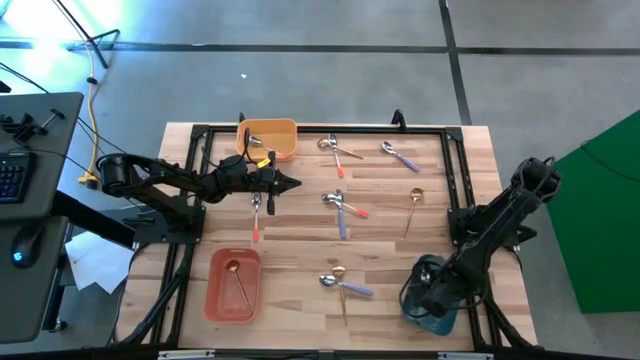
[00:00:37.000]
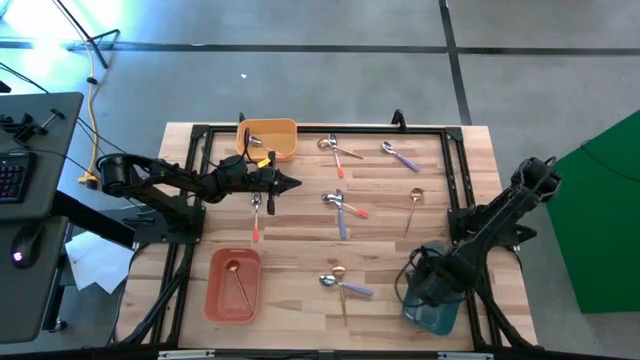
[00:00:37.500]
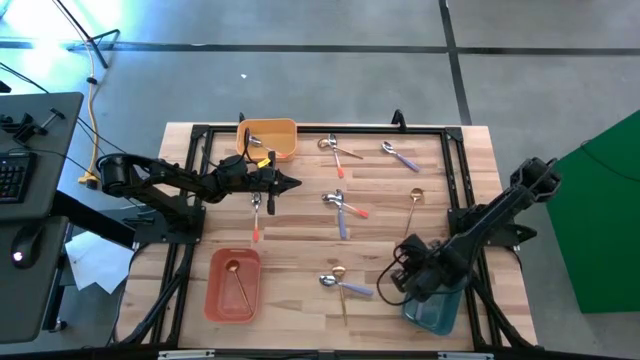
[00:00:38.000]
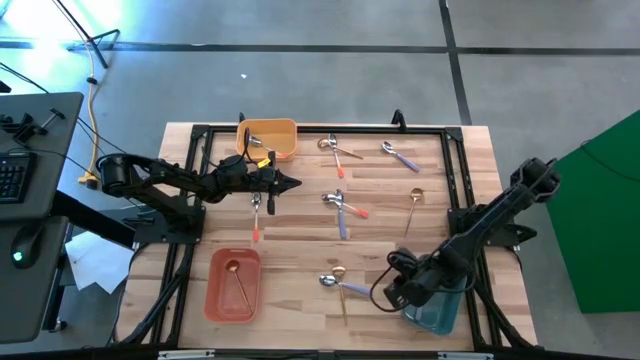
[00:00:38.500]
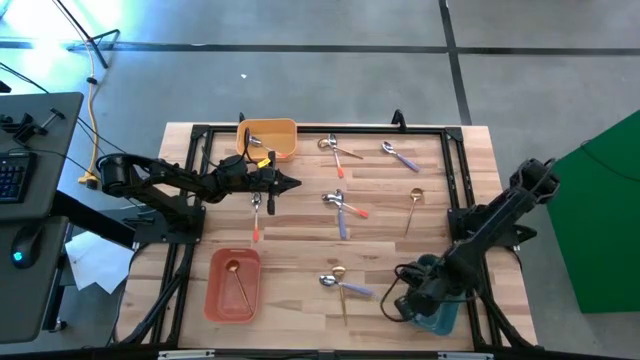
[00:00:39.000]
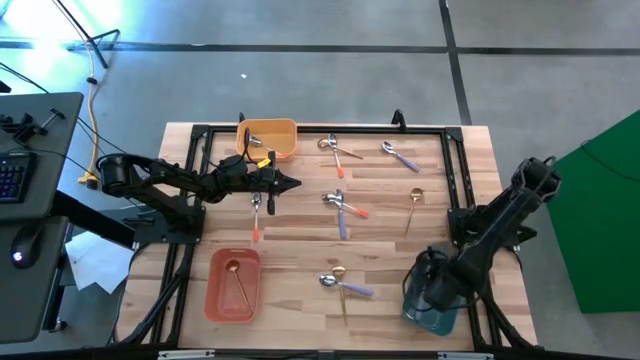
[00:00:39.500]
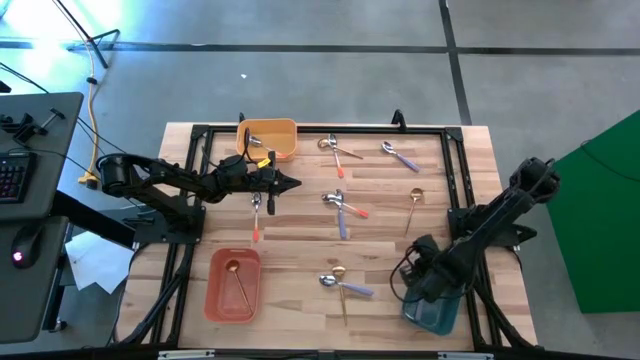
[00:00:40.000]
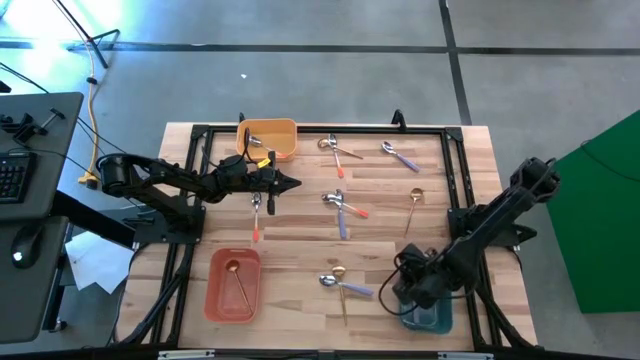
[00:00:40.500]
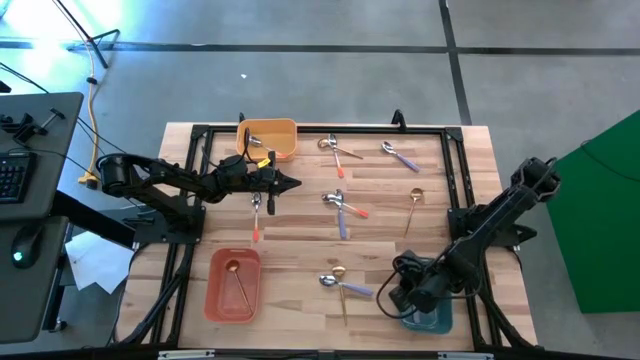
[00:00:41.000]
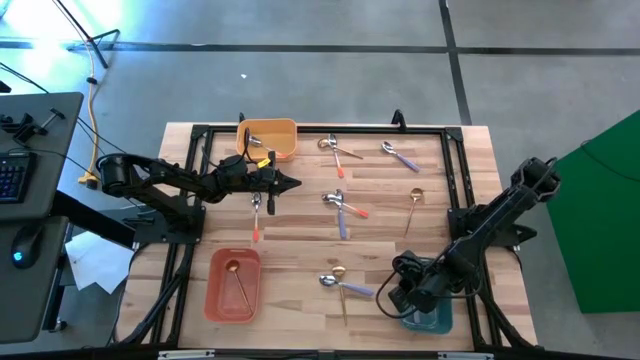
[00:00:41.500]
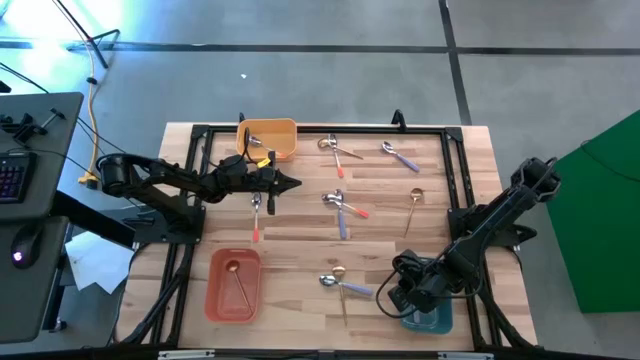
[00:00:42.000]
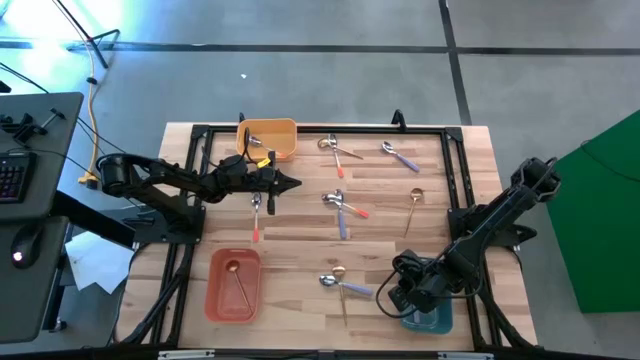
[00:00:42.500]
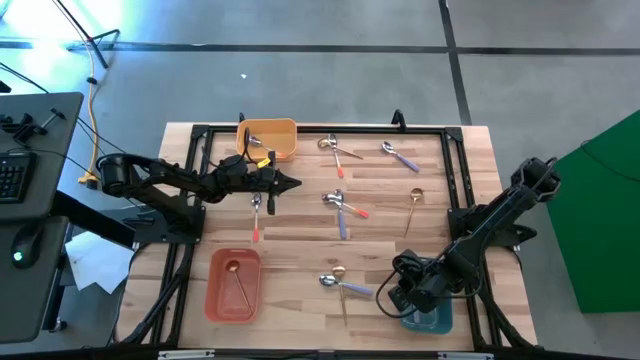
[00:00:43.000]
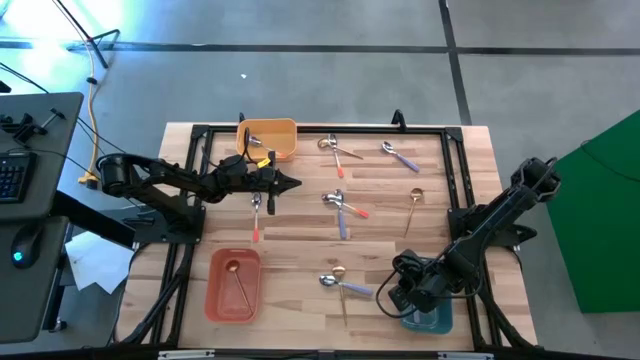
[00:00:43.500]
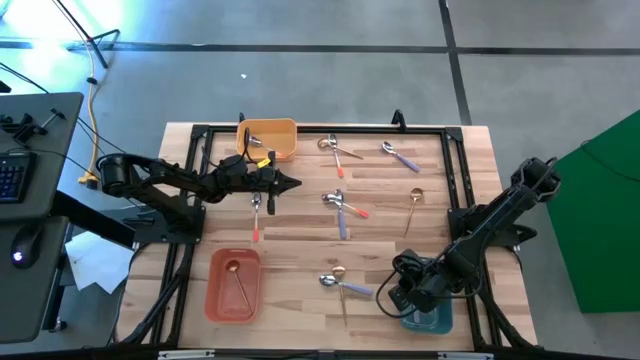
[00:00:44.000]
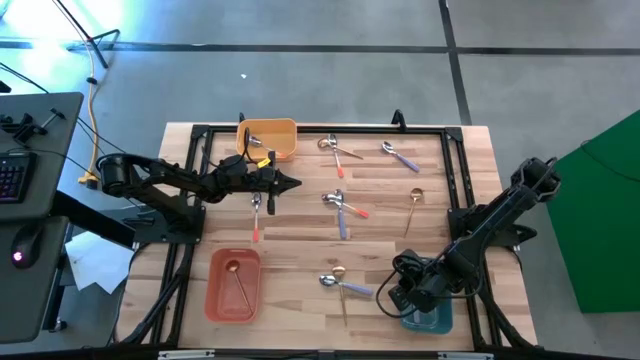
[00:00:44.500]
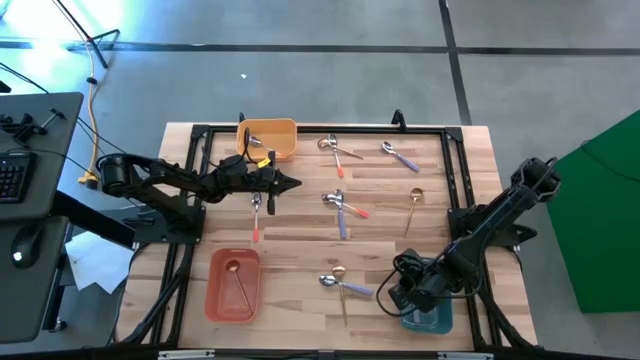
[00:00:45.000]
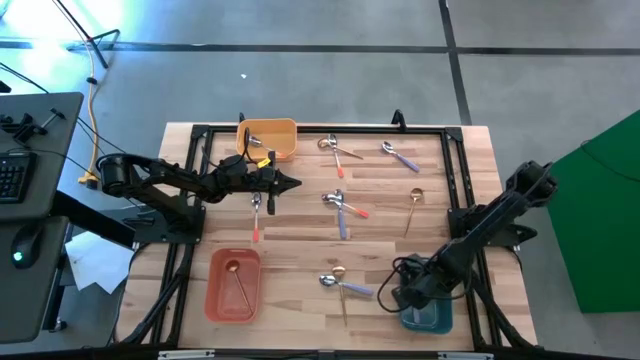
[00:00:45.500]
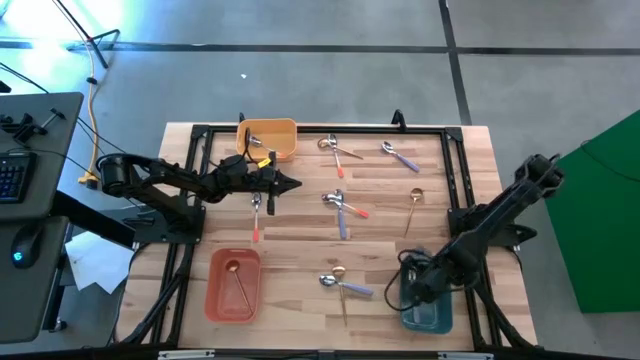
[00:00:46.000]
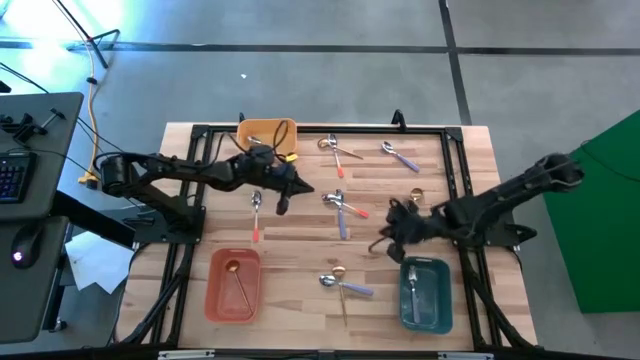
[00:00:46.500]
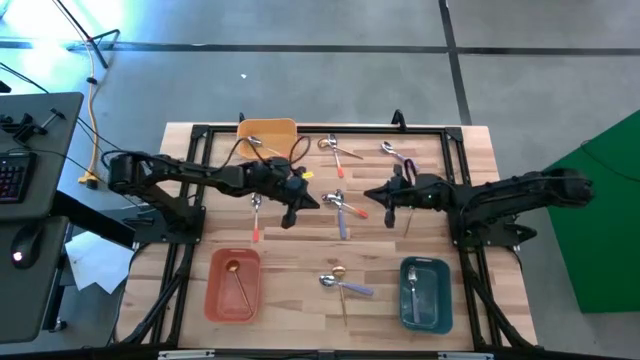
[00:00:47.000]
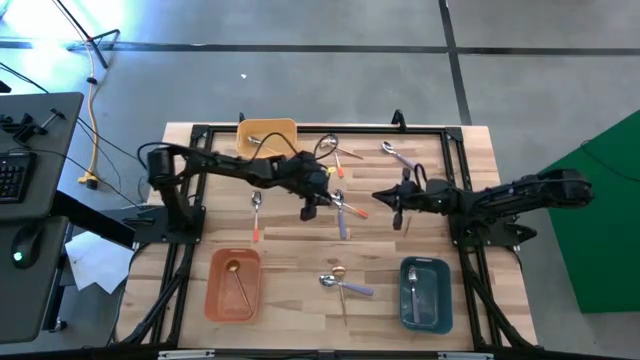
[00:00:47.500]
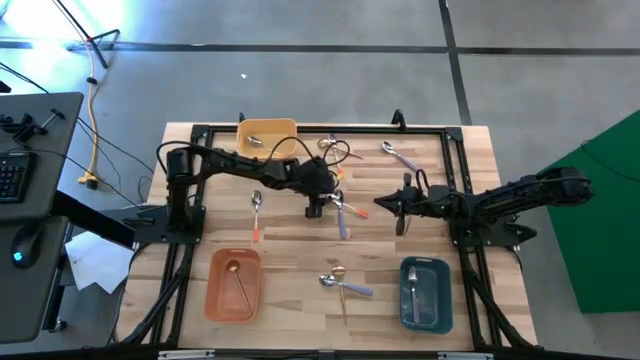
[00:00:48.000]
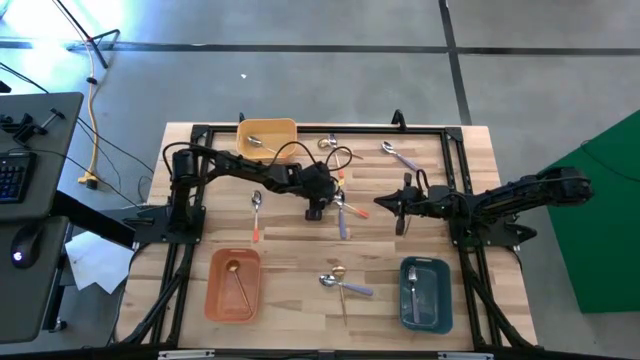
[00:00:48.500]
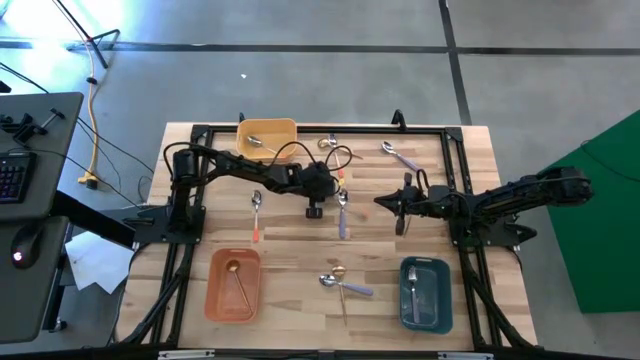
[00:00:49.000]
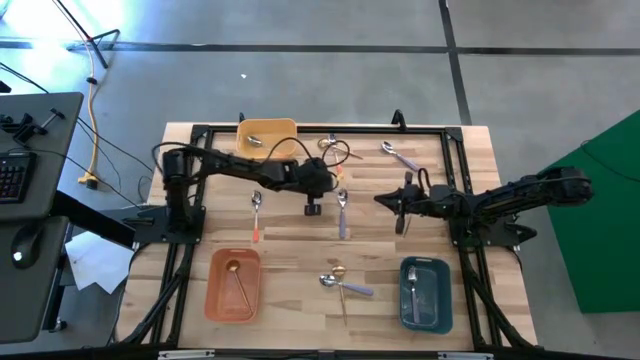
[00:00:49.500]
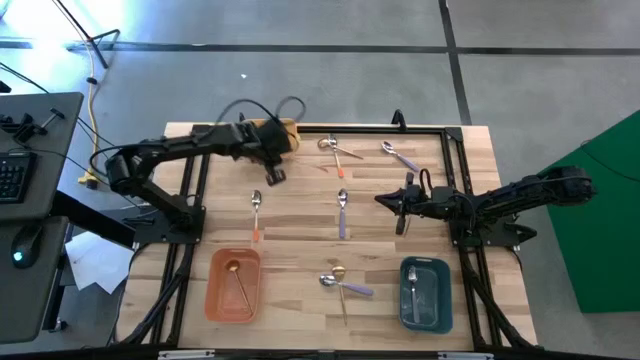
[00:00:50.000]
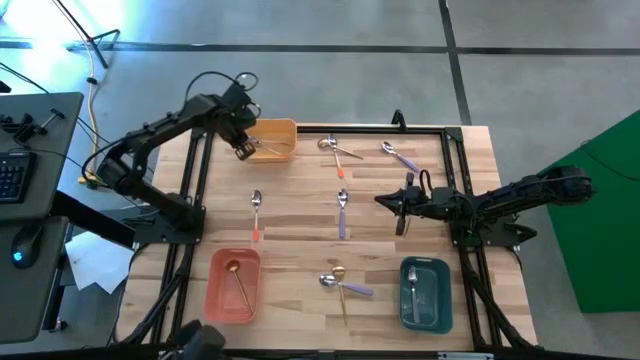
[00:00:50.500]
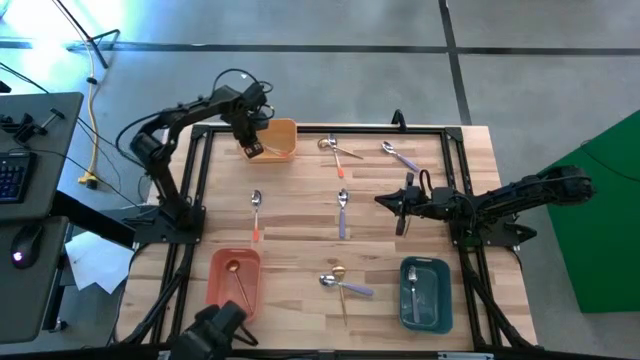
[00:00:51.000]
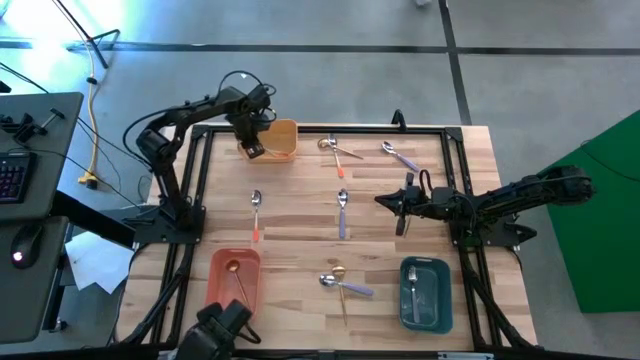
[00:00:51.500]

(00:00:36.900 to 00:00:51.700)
Task: Sort silverware by color (type)
Put the bottom right orange spoon into the yellow bin

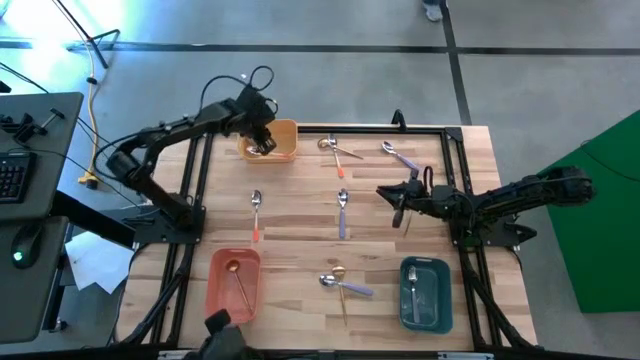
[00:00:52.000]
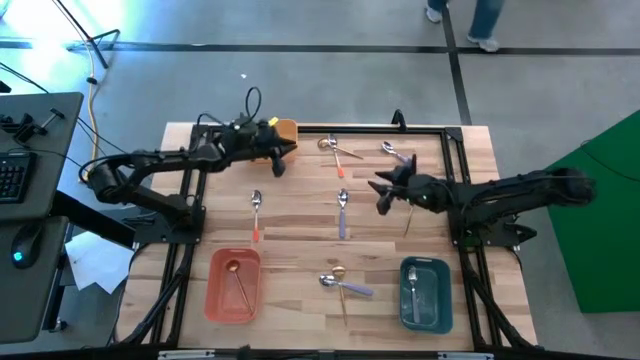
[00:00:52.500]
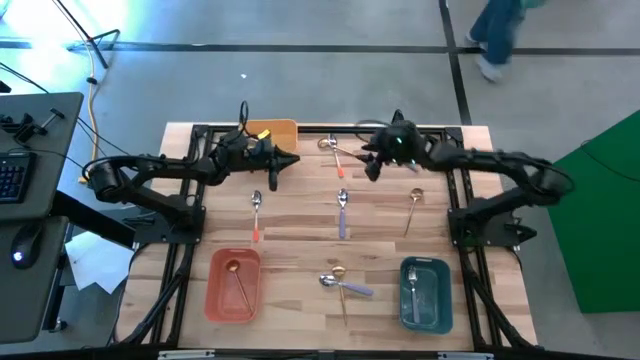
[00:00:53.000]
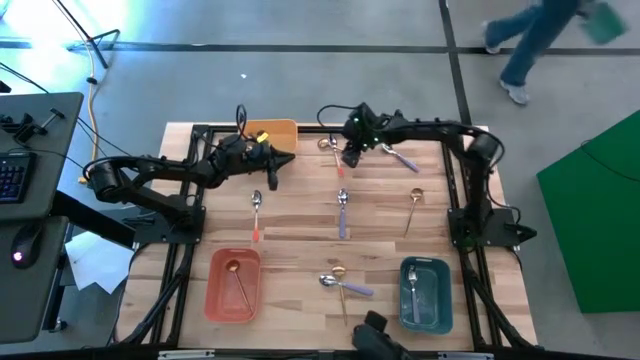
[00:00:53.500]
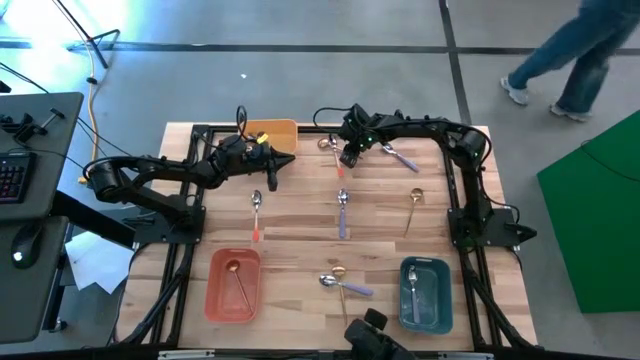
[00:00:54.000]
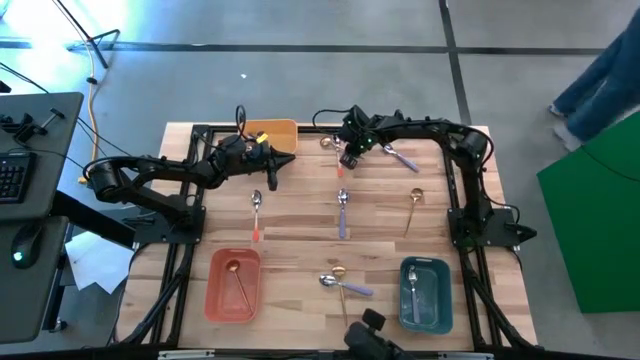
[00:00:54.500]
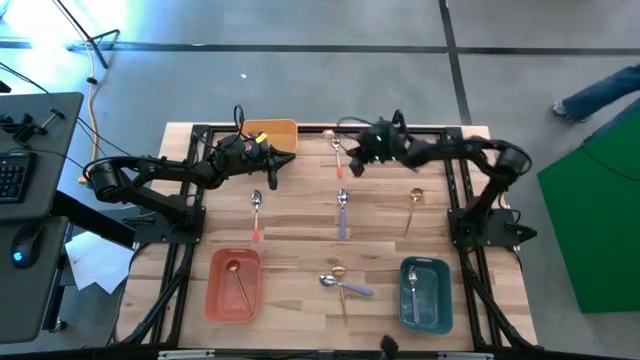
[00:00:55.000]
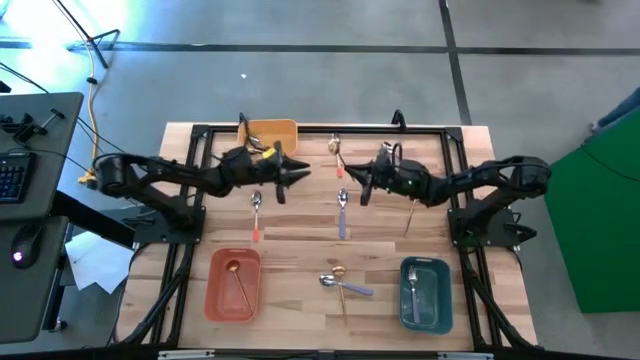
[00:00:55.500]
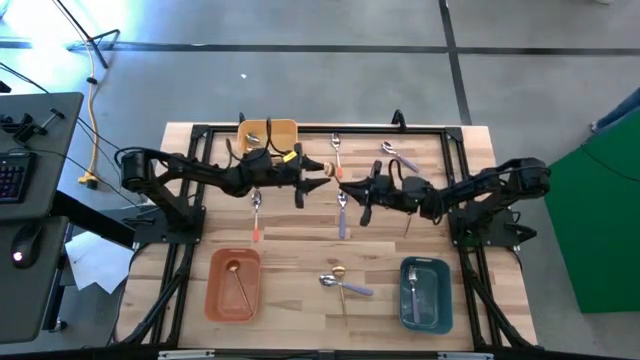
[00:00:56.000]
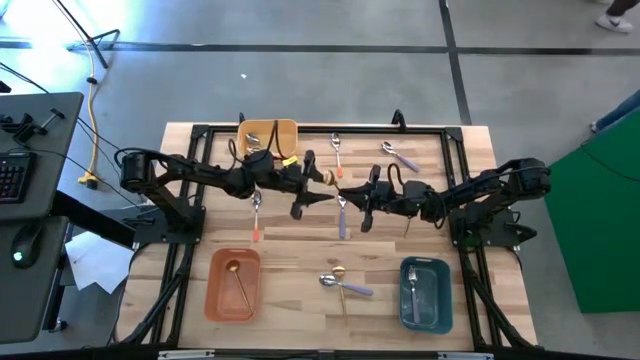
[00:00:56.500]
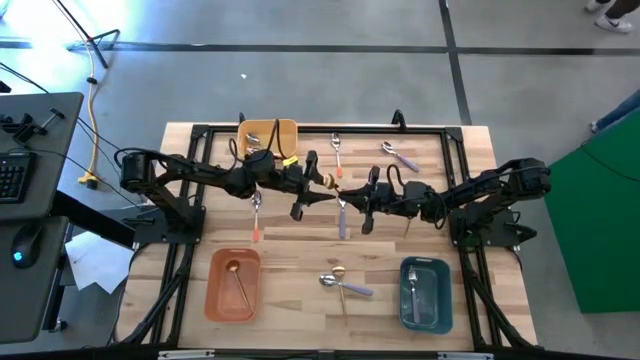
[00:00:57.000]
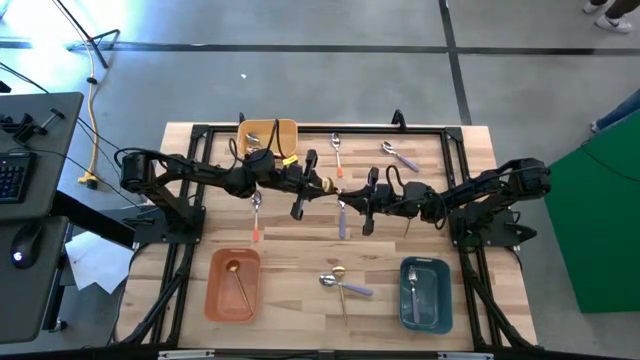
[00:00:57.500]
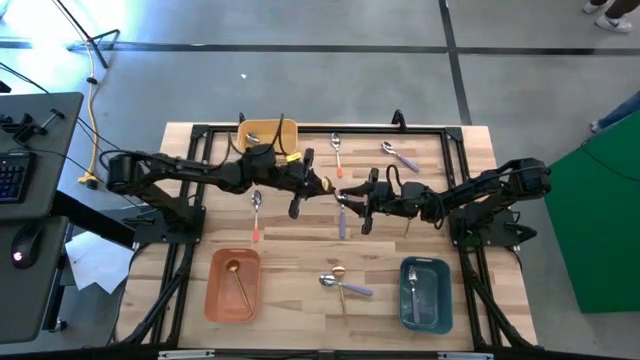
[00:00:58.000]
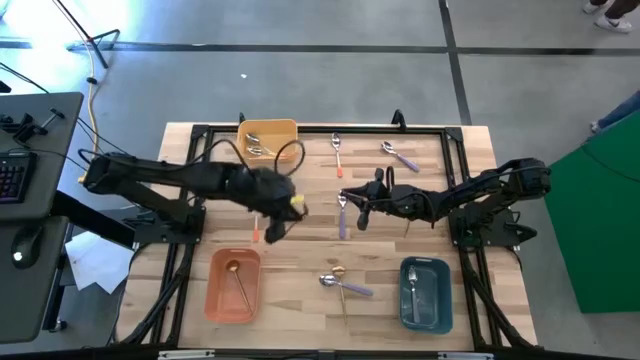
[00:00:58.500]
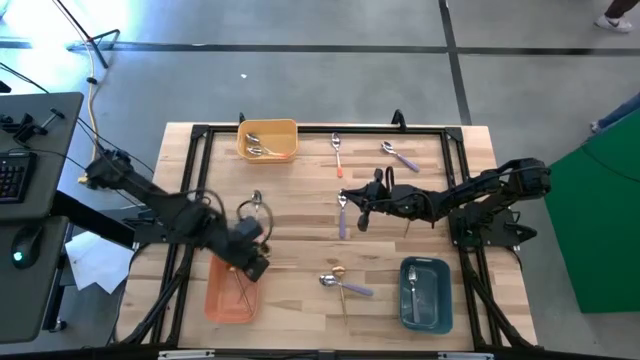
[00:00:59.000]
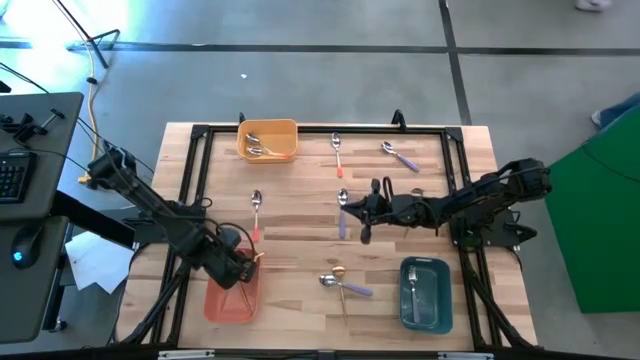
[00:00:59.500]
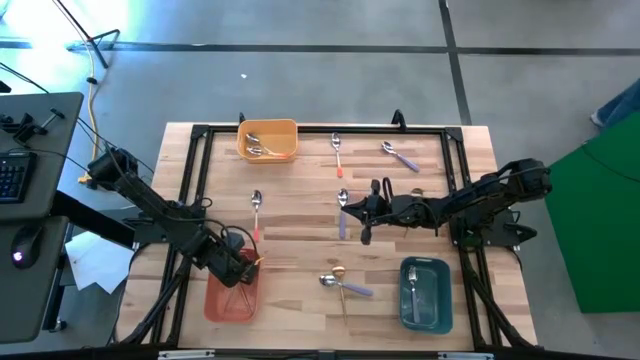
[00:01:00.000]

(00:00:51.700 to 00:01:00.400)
Put the top gold spoon into the orange bin
